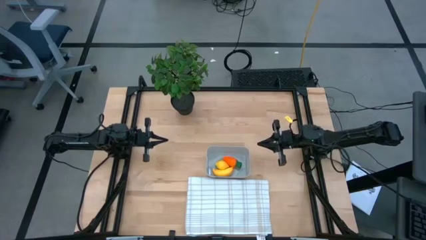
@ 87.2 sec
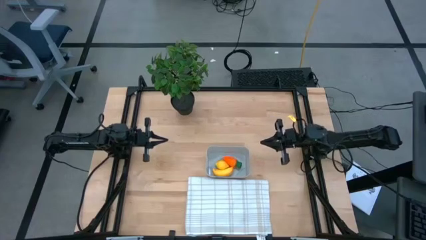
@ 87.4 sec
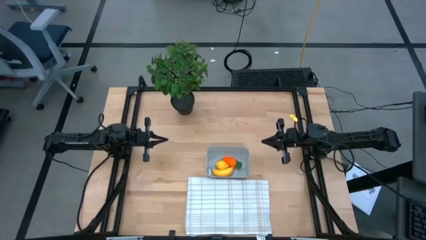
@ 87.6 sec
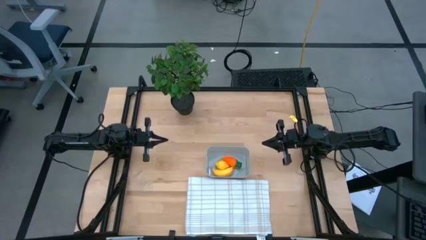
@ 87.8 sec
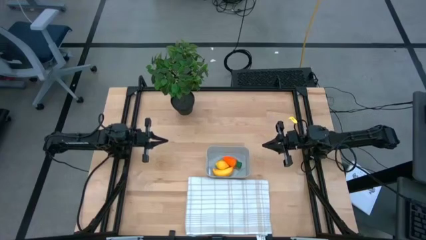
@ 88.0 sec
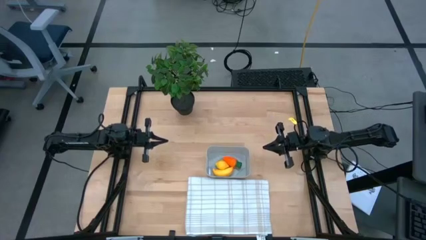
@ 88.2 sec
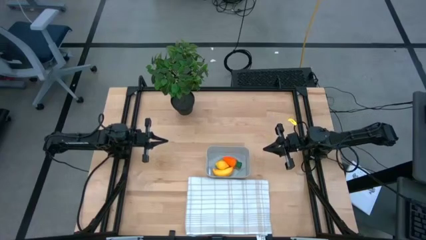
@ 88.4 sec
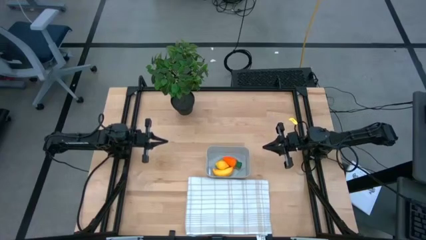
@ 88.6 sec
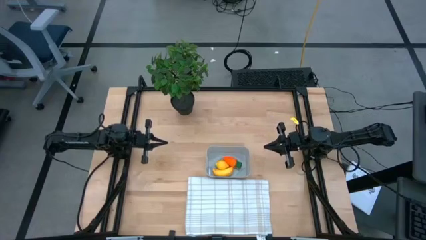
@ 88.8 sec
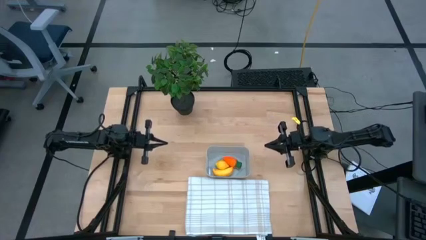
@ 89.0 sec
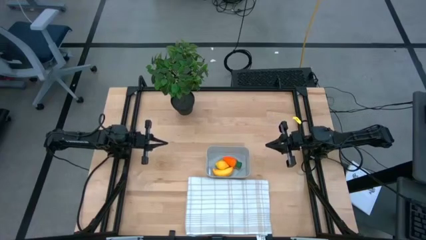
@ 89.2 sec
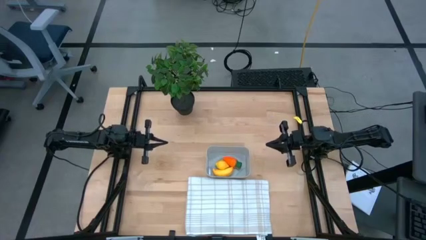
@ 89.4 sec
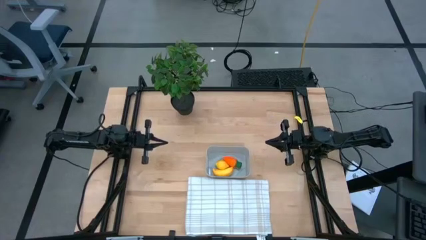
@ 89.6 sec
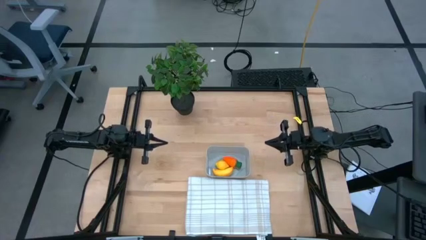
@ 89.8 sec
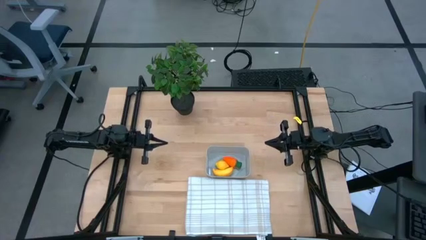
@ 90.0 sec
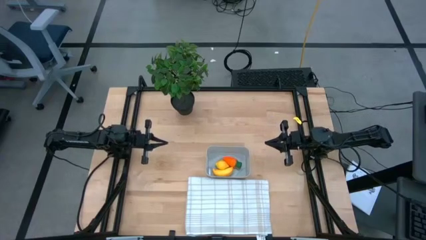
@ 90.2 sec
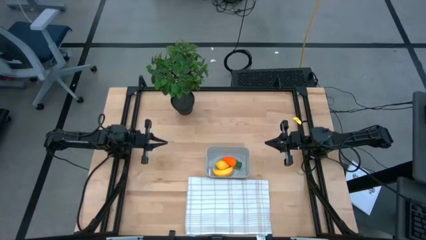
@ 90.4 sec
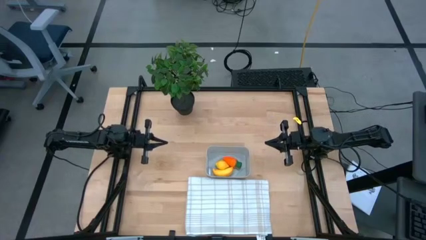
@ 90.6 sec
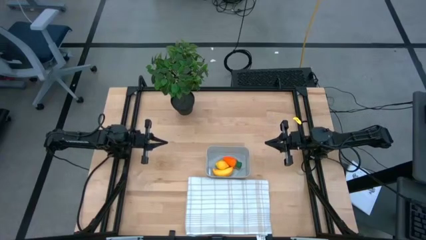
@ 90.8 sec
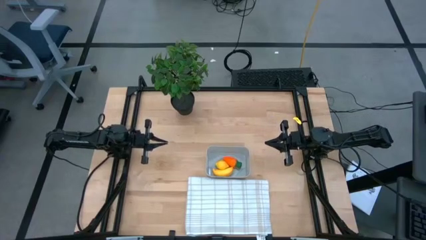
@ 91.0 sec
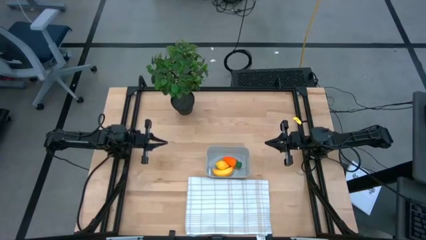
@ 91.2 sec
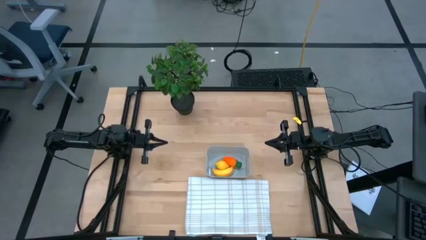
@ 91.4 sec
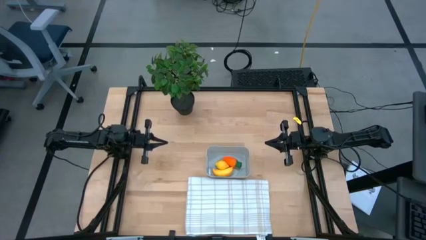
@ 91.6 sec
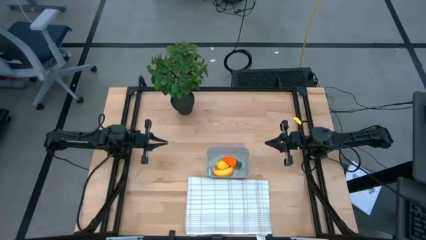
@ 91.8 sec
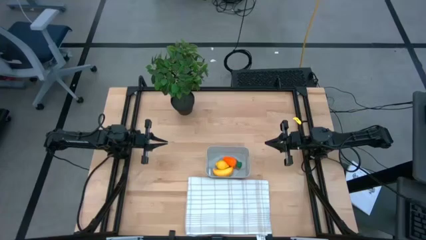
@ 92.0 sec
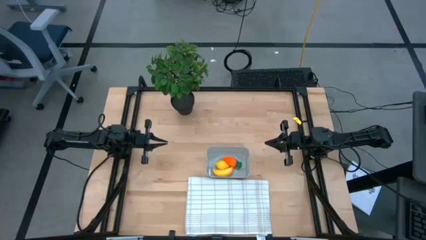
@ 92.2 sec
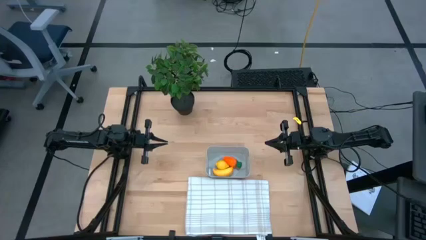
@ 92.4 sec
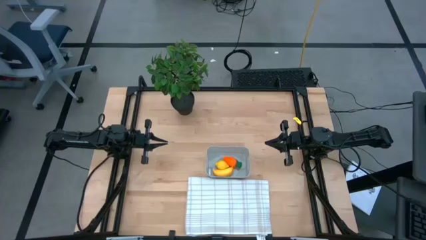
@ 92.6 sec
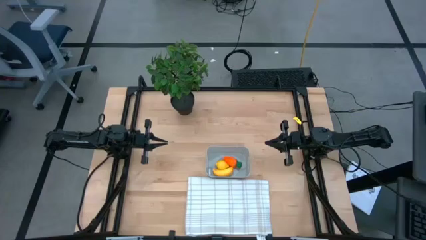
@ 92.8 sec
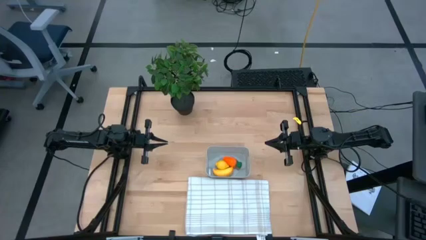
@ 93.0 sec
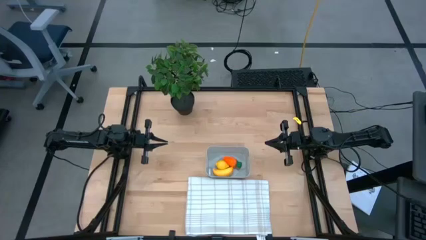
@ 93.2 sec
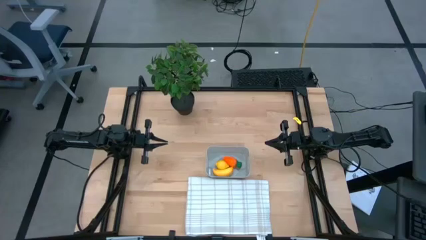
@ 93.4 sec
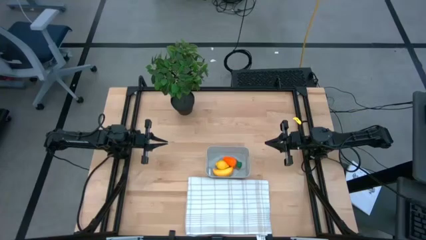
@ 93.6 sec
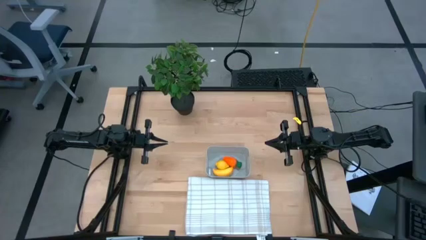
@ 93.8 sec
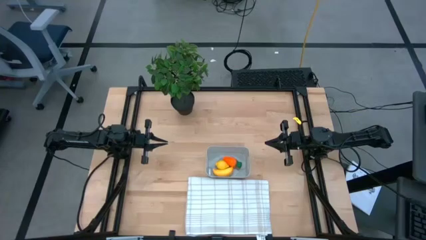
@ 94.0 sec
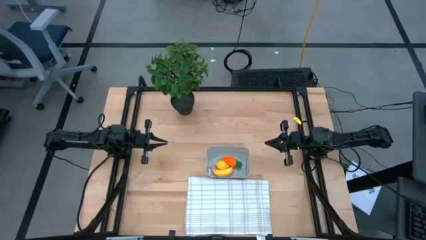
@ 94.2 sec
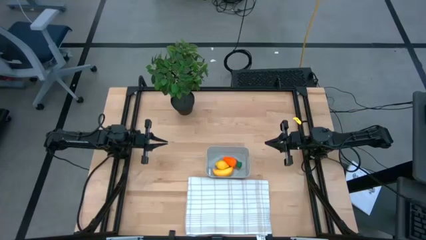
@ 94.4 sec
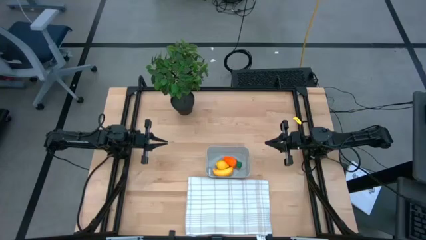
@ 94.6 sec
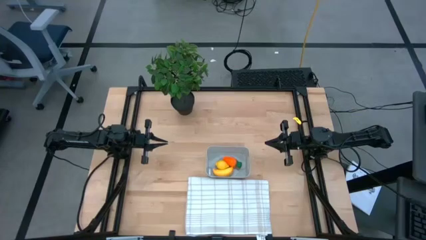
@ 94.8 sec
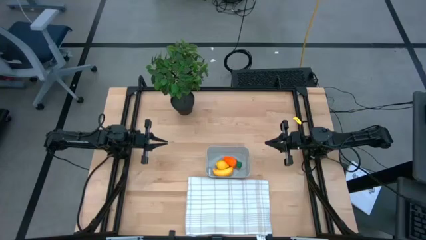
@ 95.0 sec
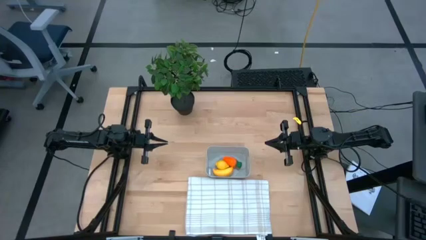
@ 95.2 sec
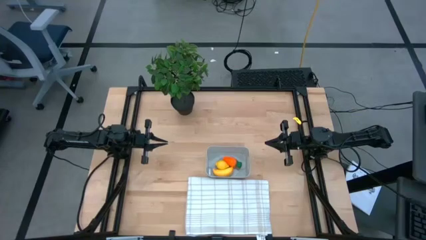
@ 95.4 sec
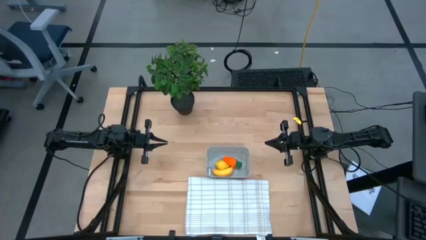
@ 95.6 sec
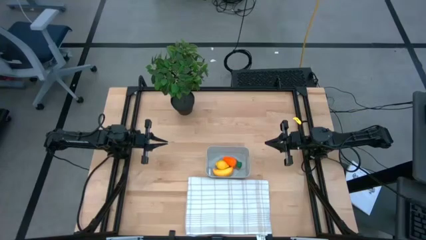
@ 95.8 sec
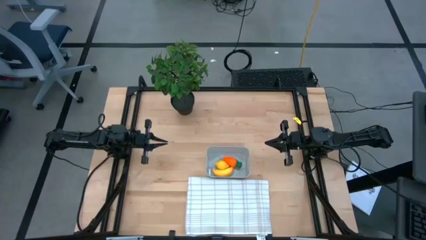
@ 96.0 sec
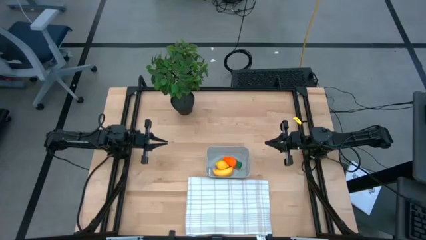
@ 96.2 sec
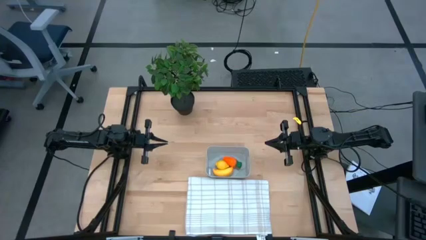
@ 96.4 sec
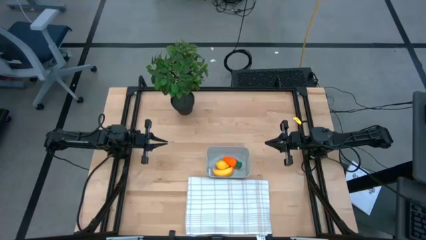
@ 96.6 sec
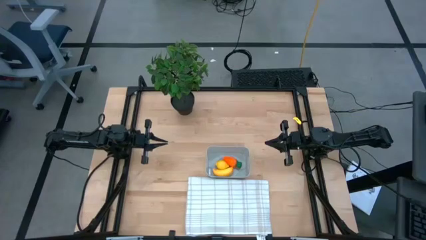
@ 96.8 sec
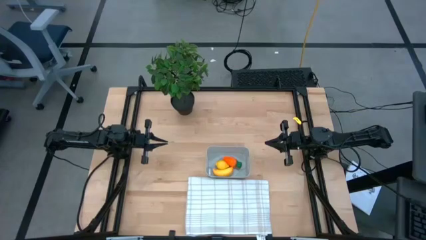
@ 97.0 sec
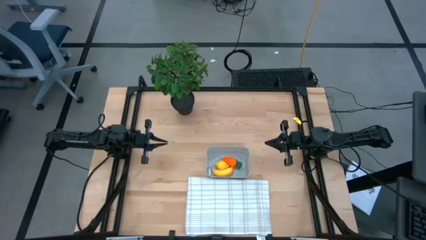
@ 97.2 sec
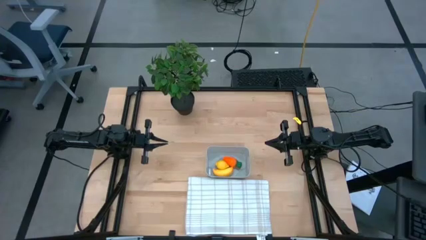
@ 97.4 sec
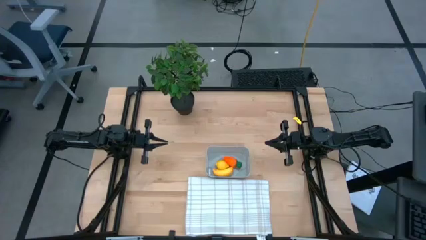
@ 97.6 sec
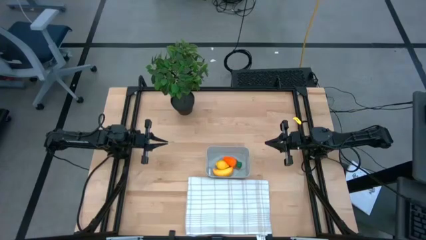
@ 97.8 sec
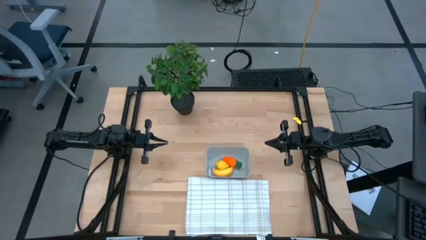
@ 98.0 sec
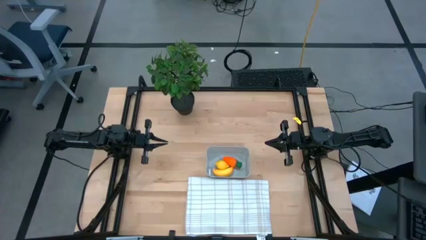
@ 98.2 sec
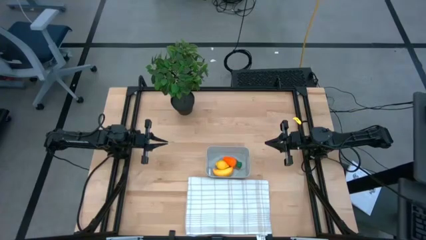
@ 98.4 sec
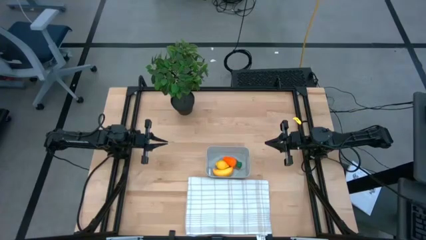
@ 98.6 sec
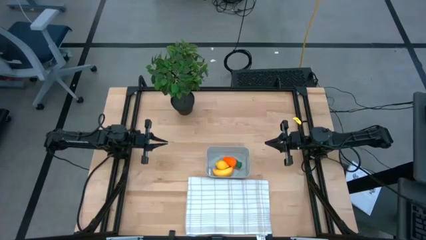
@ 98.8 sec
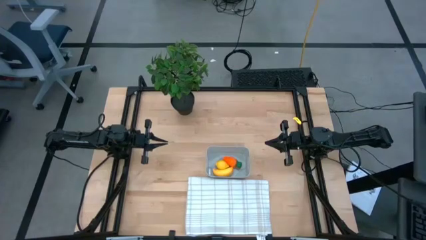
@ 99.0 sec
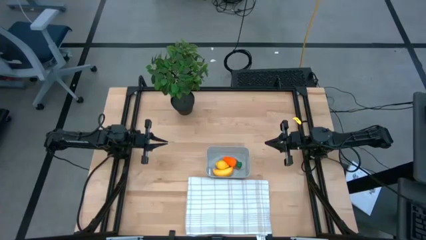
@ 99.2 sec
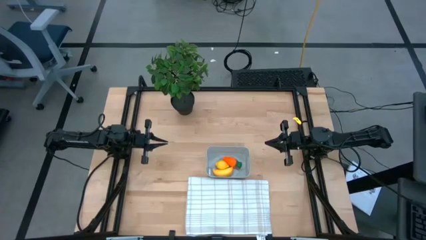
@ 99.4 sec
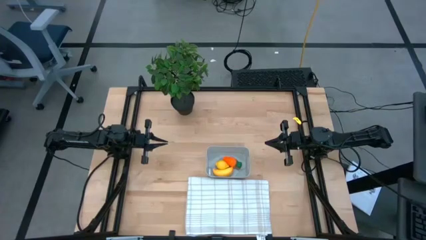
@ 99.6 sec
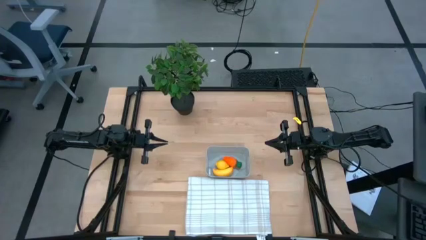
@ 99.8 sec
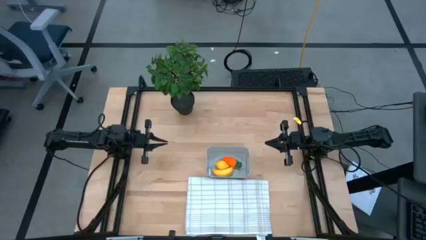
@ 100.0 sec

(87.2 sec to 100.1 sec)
Task: Pick and placing Produce into tupperware
Return to Home Position
